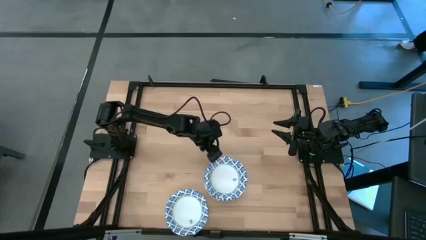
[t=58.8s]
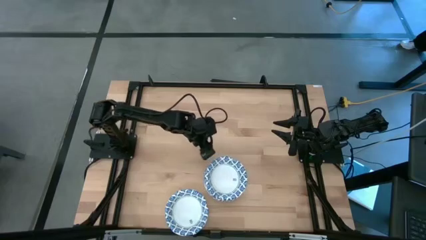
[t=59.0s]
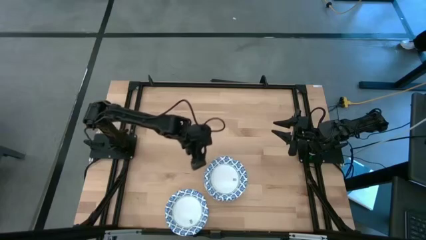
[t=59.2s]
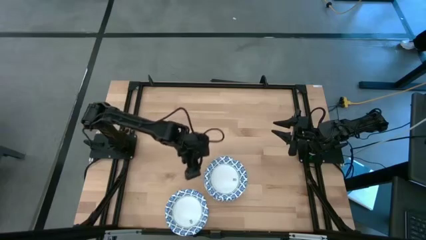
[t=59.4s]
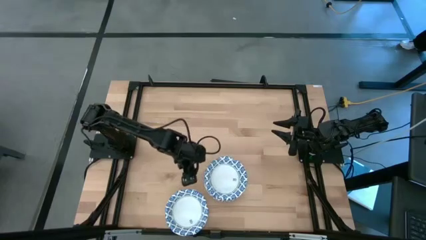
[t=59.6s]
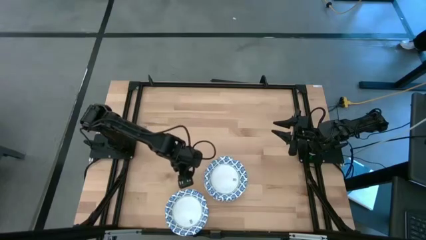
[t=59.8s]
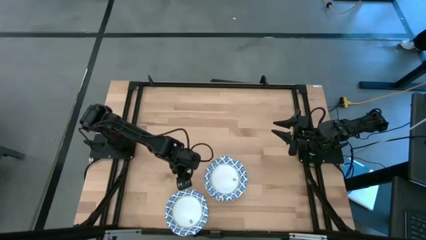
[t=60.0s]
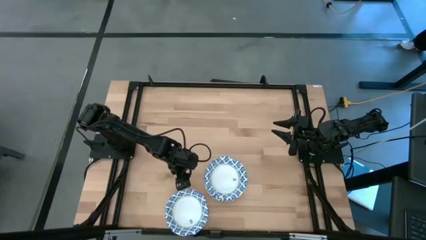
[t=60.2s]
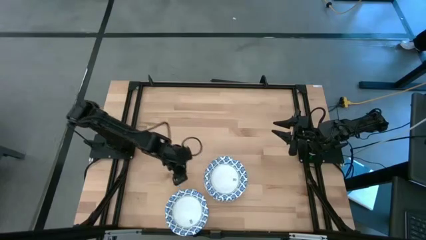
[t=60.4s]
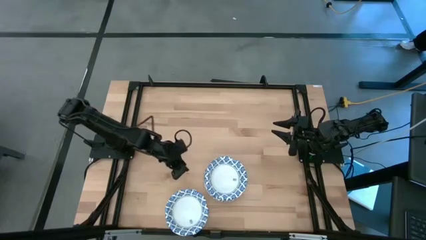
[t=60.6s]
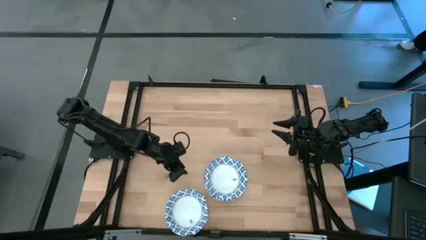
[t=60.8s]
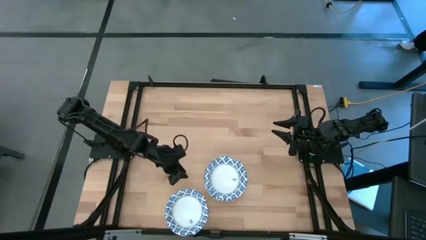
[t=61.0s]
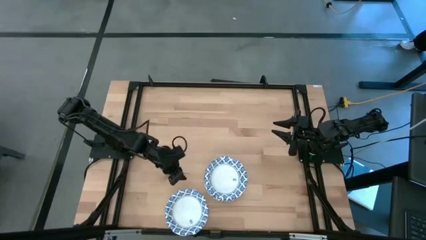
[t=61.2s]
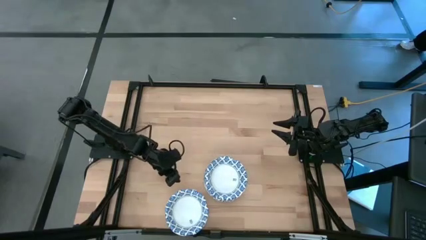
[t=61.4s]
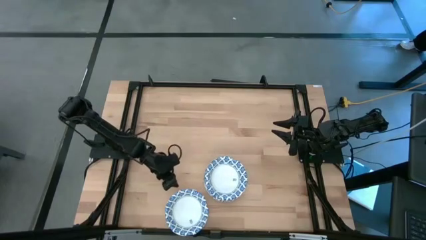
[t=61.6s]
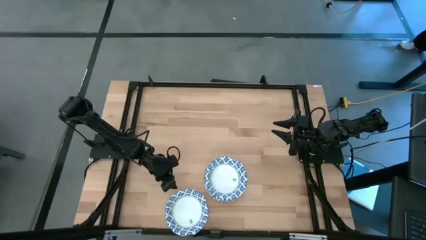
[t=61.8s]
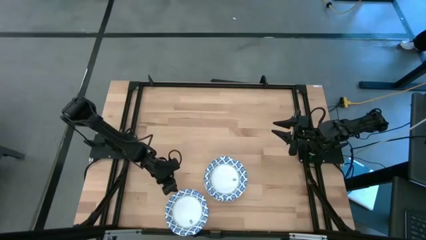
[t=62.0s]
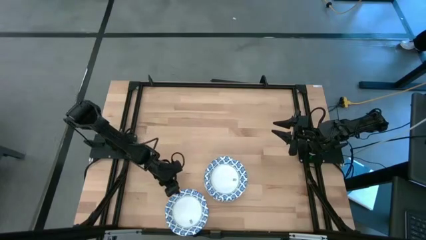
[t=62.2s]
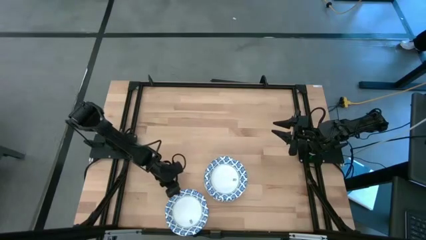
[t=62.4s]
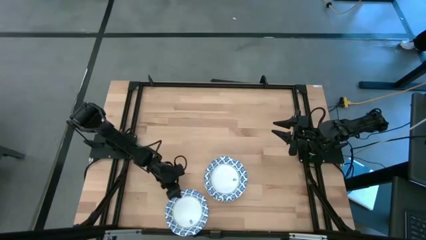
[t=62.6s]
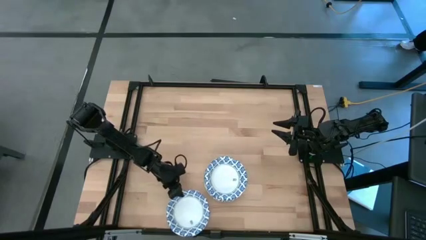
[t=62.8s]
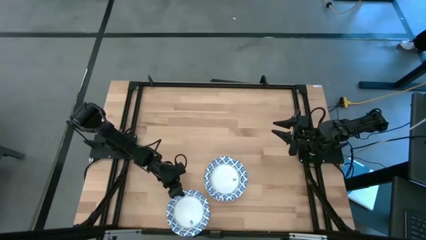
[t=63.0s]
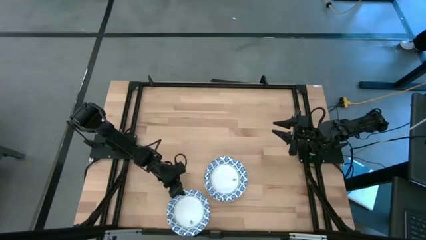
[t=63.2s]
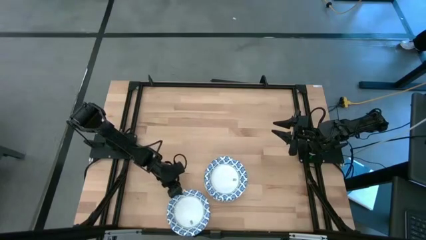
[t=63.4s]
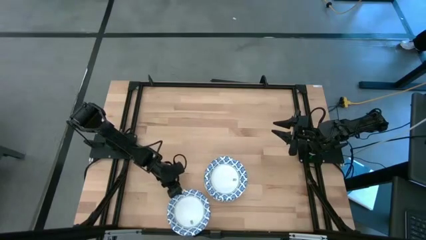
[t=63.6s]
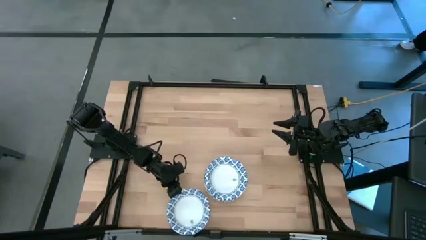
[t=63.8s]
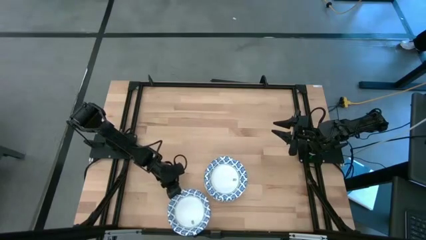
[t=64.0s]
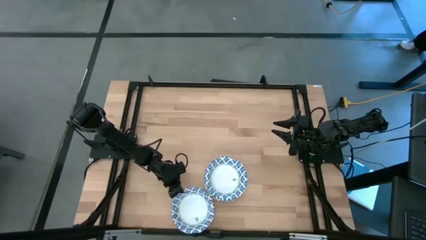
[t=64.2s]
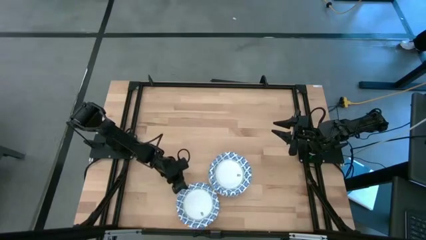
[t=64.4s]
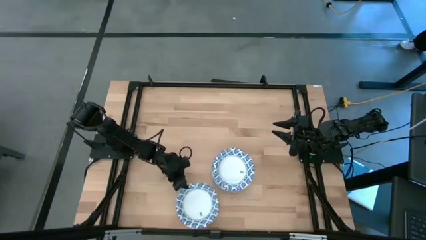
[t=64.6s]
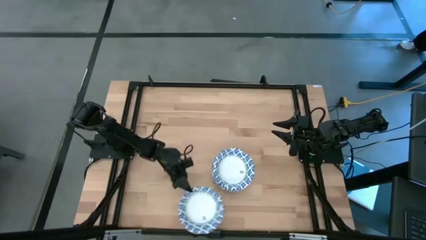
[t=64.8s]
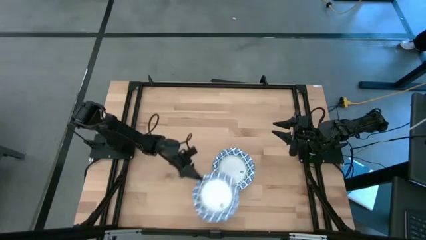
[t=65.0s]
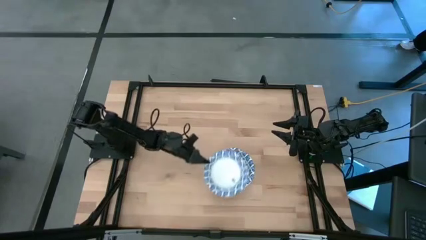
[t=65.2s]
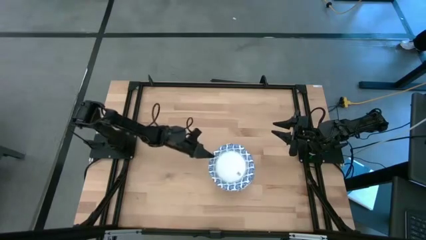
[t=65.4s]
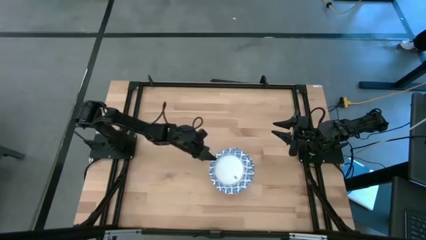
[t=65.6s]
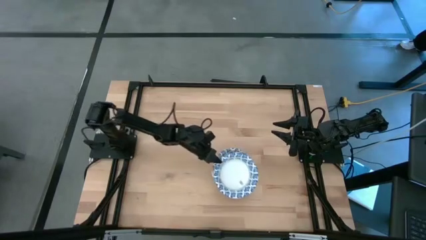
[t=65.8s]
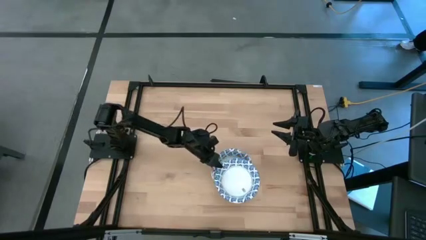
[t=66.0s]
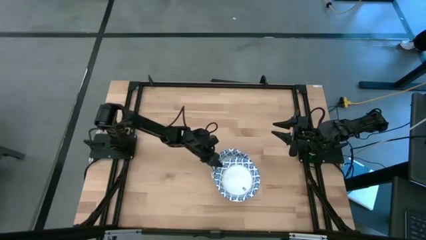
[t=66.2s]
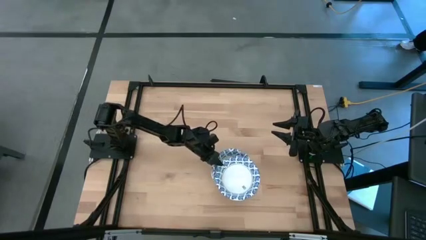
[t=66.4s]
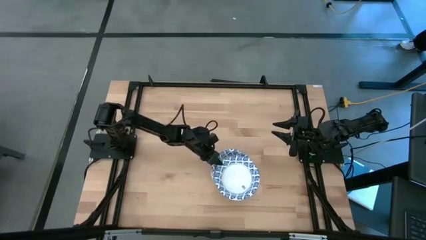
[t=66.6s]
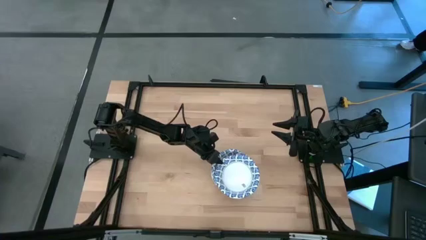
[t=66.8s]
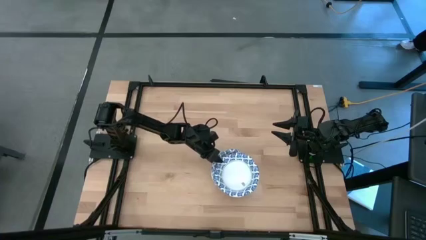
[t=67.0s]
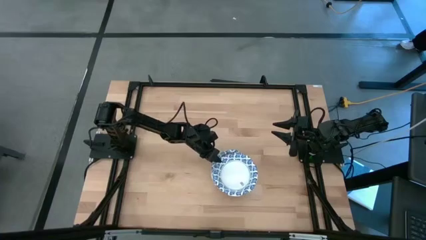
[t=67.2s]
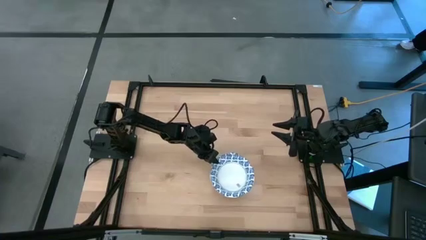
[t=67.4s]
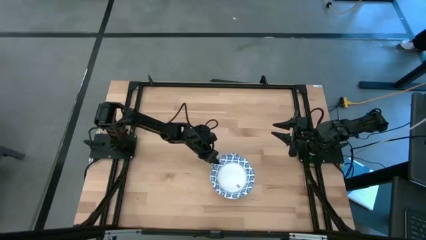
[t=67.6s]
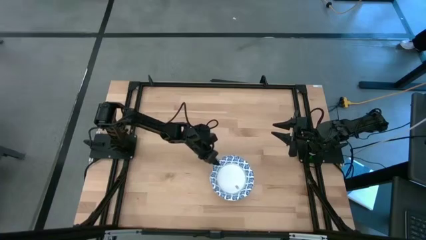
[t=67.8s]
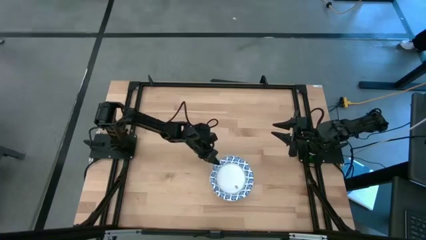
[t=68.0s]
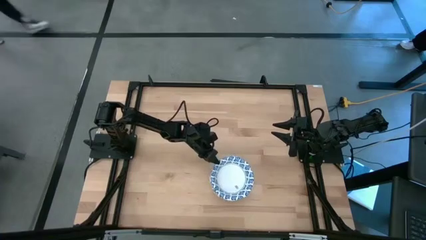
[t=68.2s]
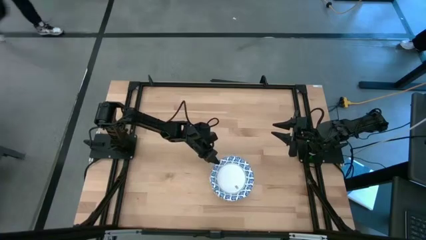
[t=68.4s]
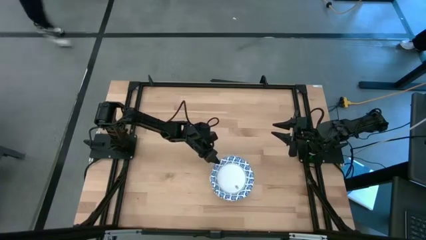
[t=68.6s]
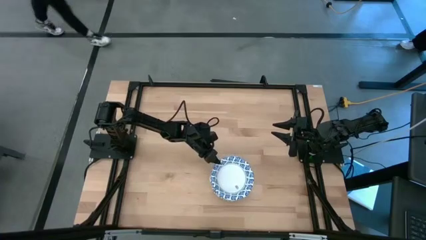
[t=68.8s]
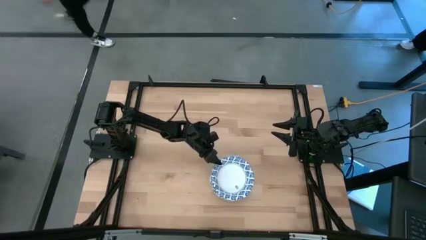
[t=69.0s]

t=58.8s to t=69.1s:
Task: Nest bowls inside each other
Stack the blue patterned bowl on the blue patterned bowls
